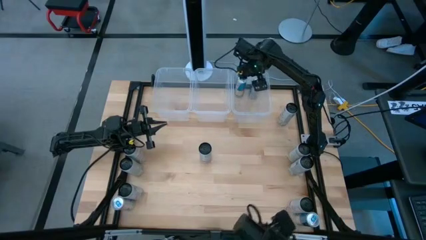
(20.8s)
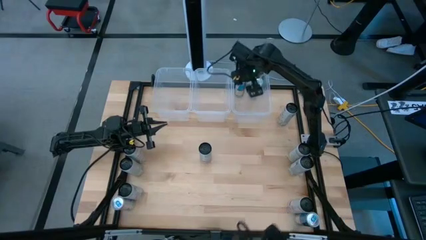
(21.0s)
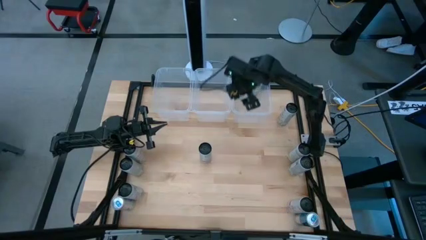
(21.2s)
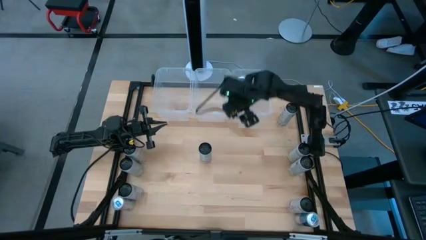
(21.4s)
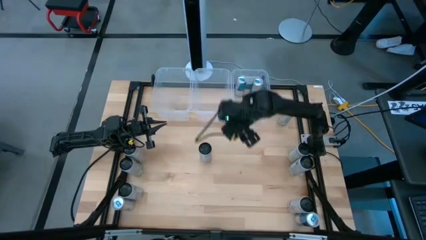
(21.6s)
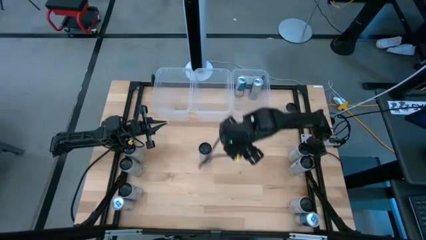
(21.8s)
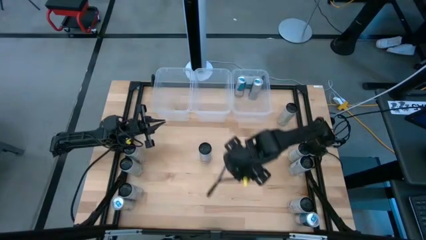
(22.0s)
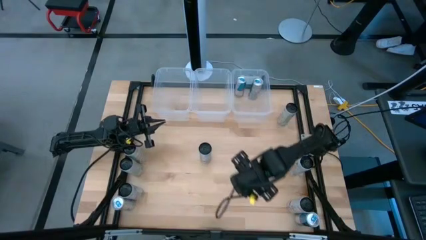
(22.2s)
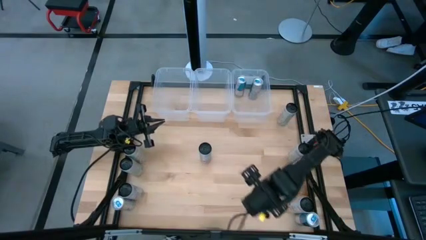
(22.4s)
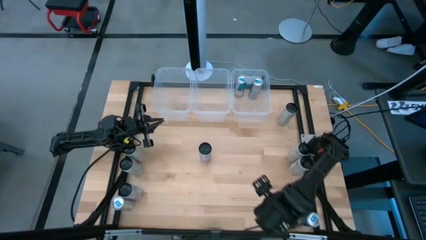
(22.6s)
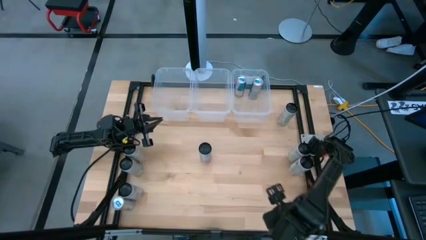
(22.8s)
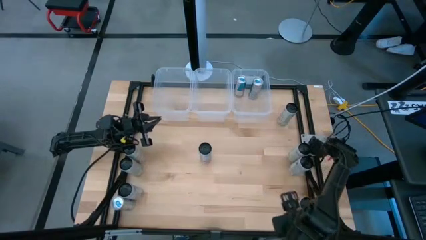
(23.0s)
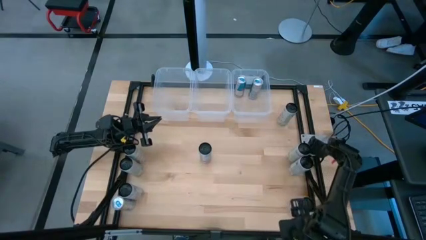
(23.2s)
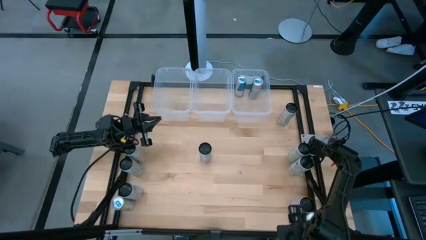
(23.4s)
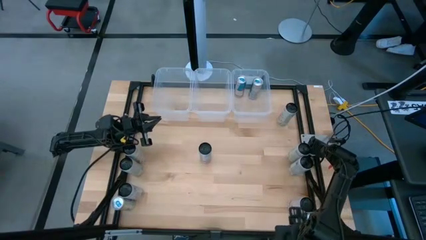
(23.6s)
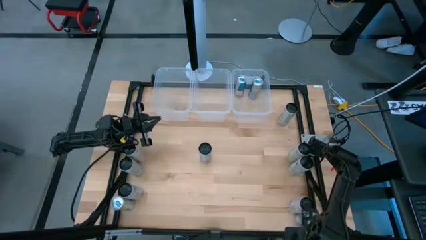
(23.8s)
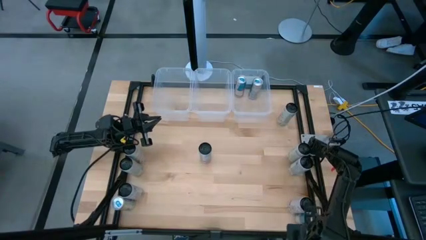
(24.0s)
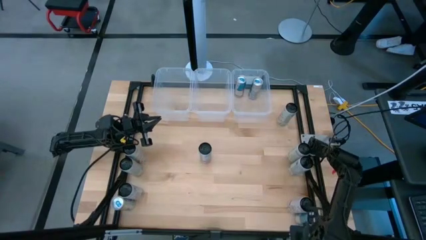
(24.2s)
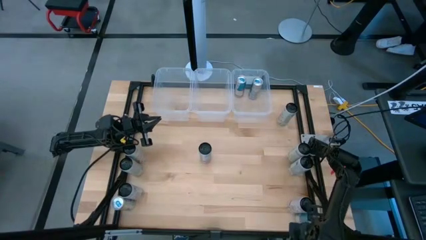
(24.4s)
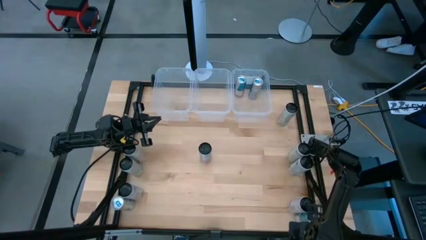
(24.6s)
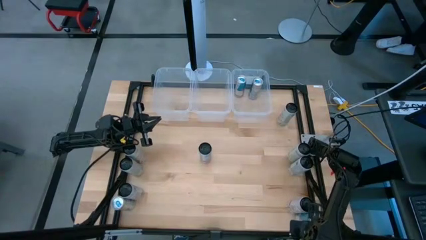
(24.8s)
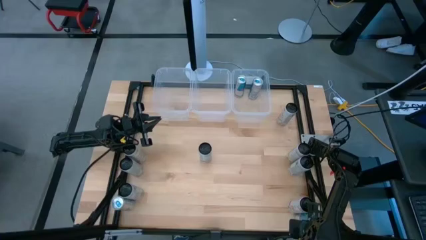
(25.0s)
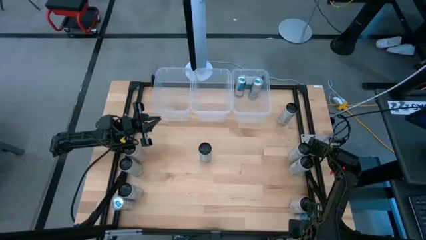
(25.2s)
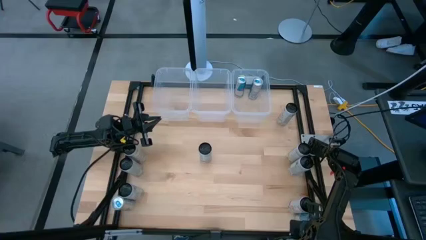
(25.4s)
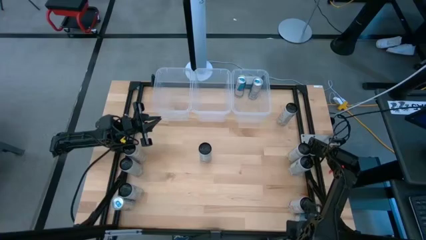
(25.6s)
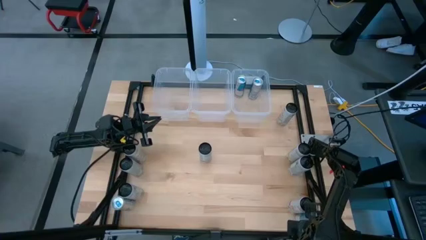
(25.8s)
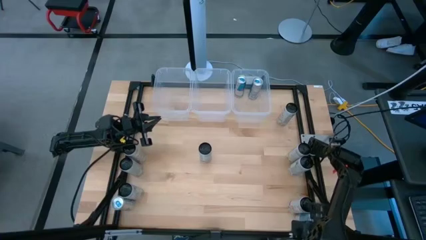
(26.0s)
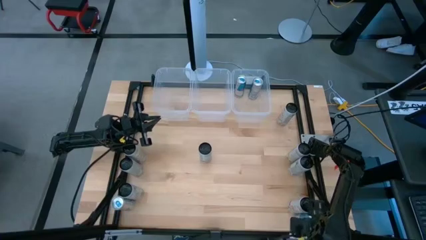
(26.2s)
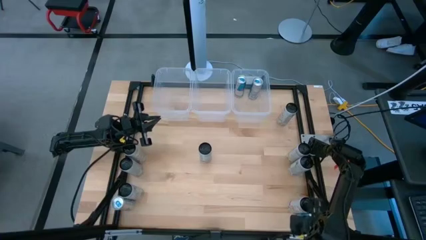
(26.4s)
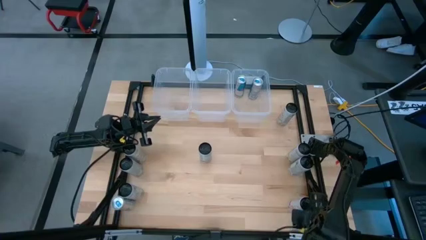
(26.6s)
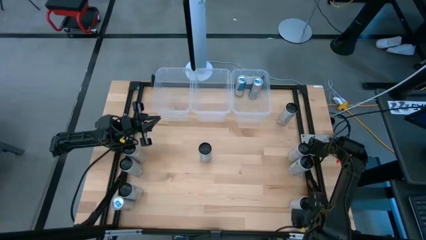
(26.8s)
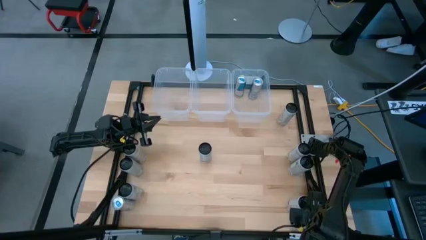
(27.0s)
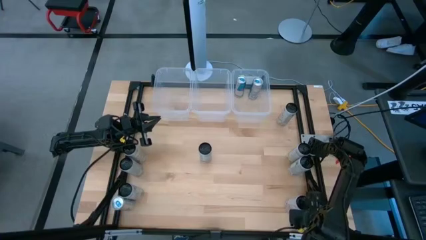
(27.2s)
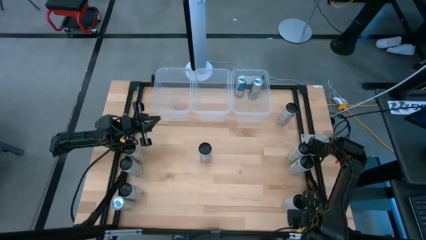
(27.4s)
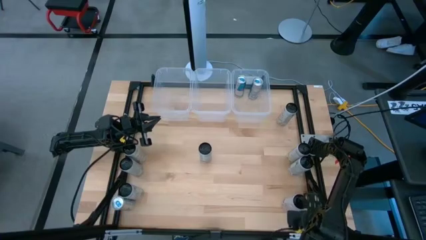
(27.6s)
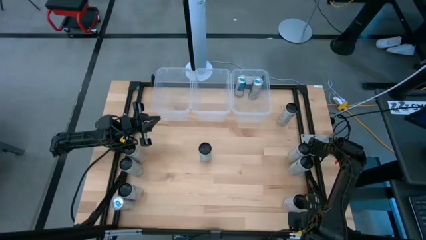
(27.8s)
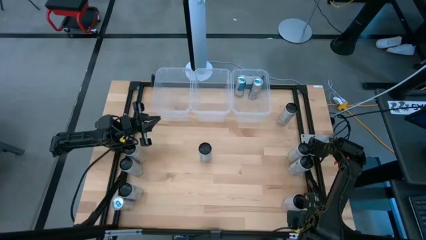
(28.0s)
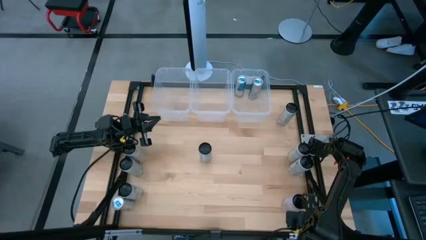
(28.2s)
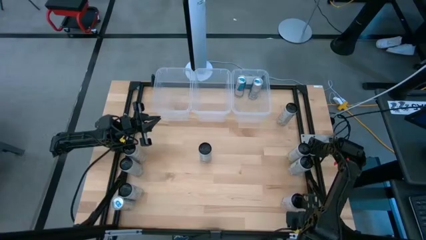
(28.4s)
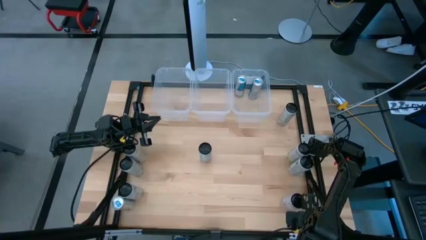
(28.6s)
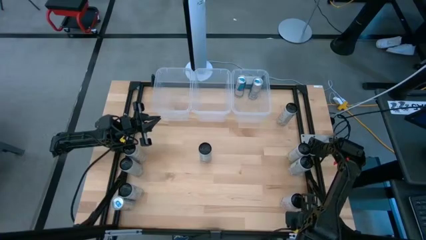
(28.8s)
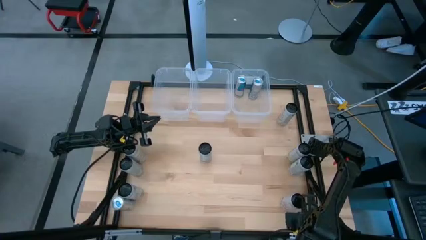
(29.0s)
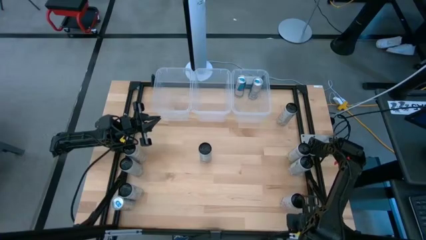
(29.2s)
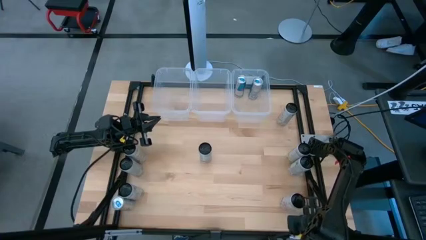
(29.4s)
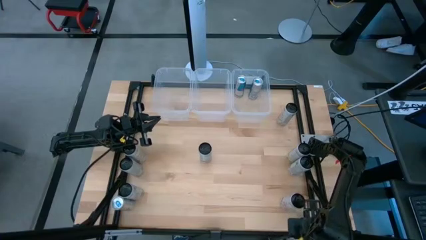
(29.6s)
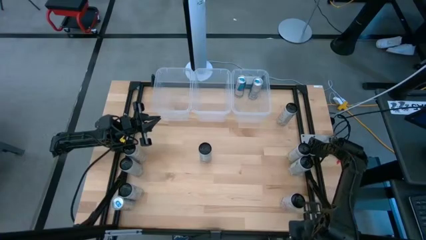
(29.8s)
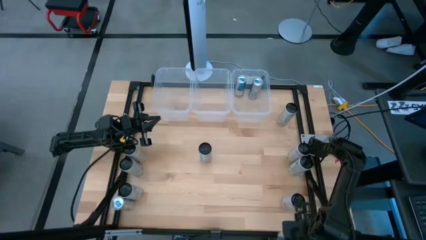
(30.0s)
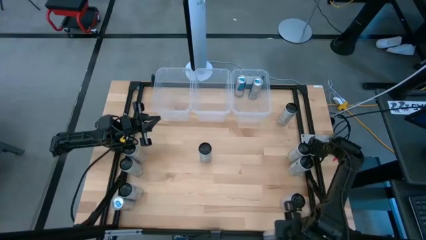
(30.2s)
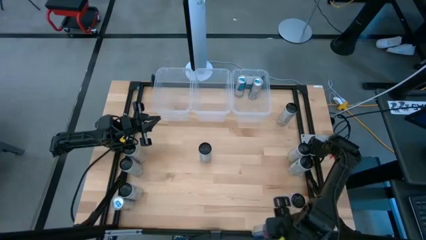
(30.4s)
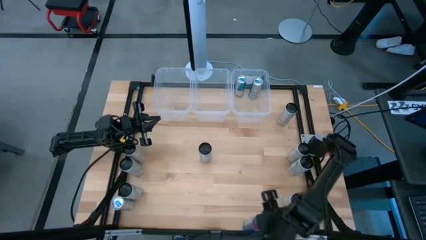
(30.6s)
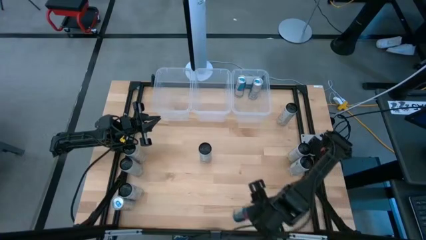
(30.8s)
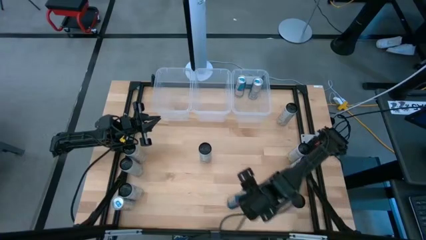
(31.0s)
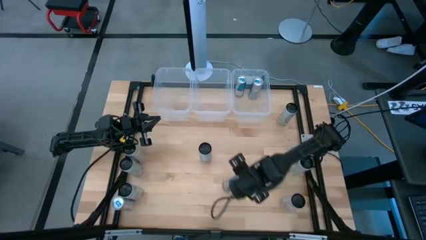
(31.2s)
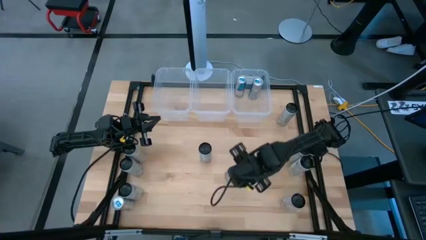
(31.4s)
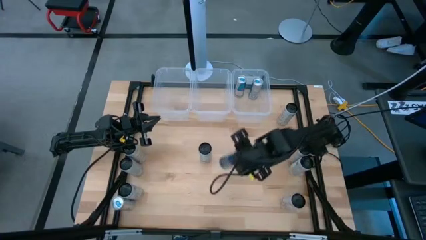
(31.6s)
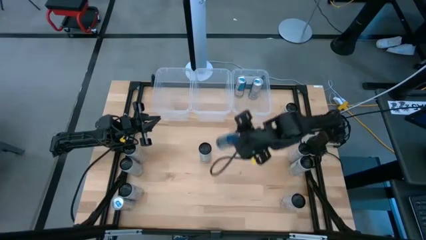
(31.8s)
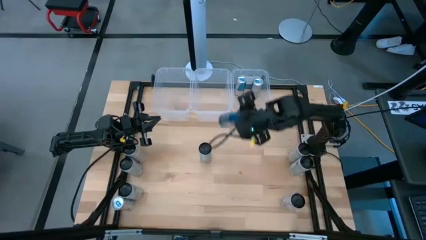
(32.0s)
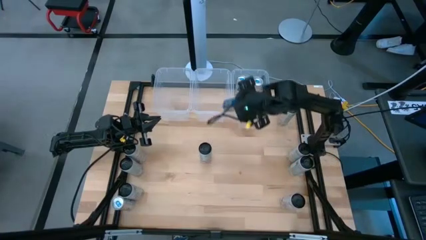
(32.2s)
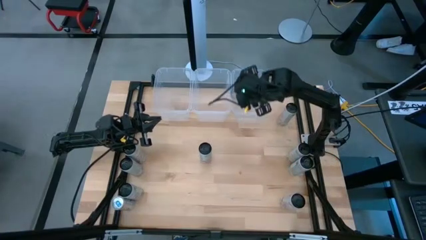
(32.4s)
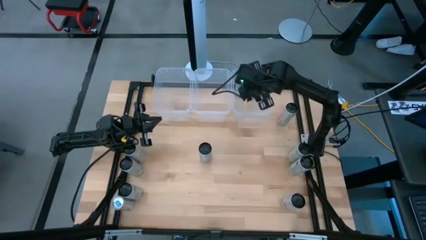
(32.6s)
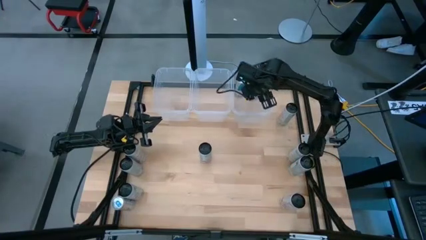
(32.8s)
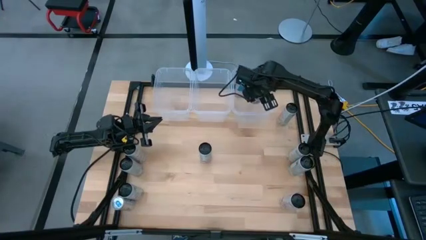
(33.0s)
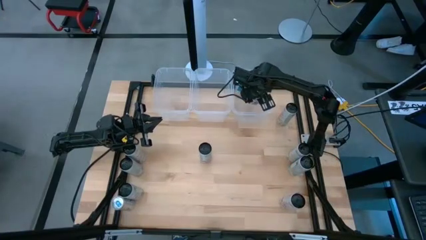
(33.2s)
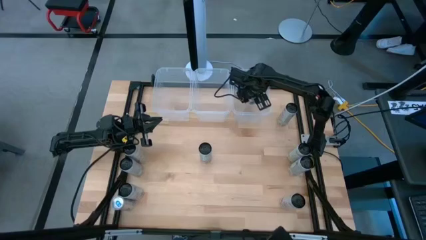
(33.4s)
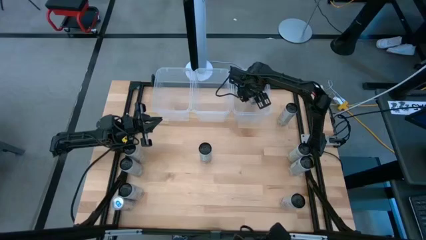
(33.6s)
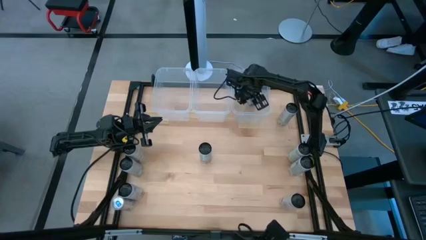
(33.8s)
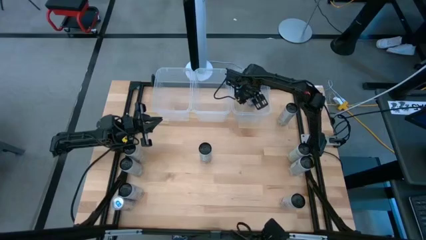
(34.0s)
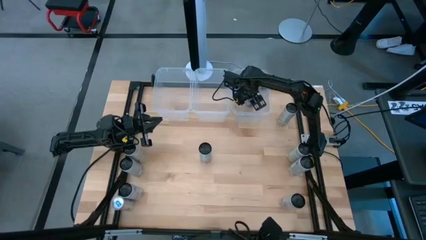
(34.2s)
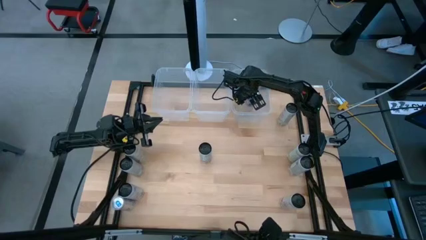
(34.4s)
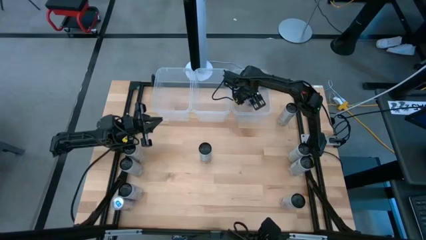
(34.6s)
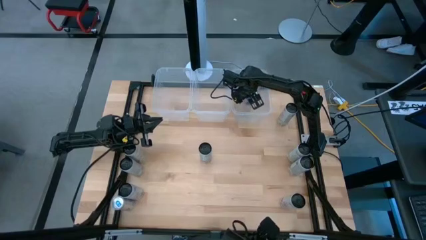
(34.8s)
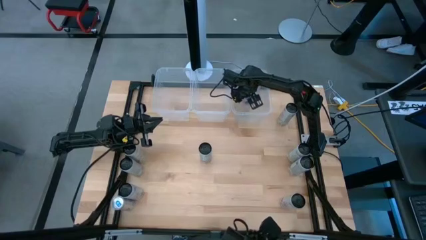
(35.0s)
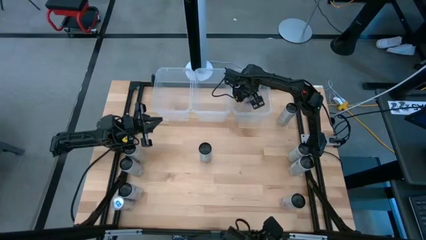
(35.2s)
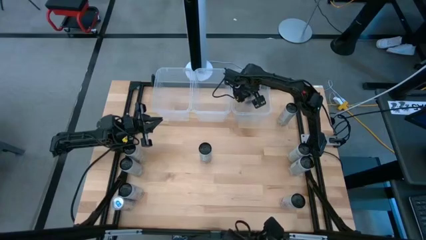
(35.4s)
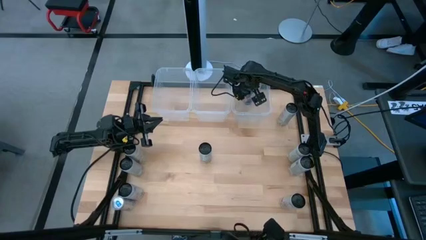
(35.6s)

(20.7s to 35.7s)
Task: Sort soda cans
Put the blue soda can into the right transparent bin
